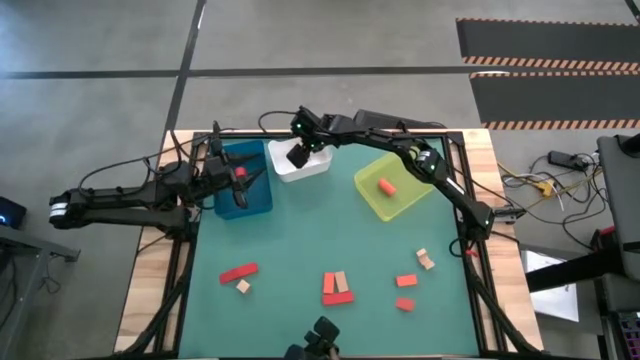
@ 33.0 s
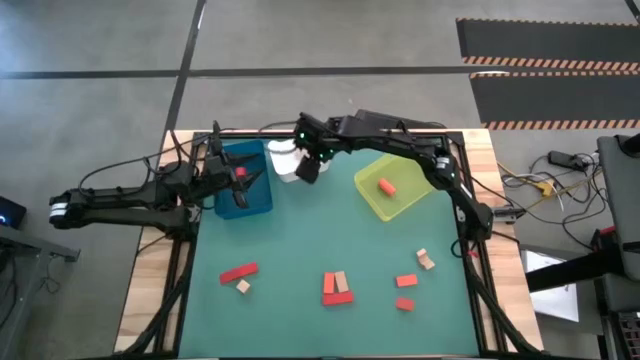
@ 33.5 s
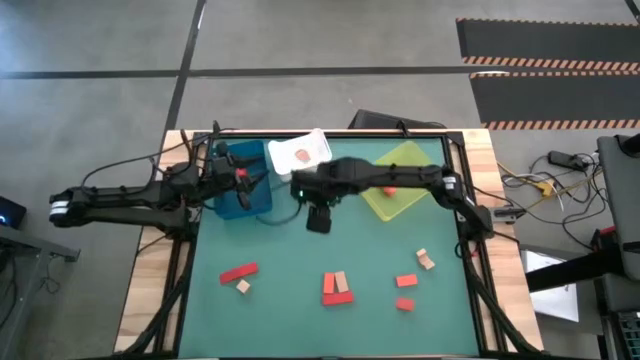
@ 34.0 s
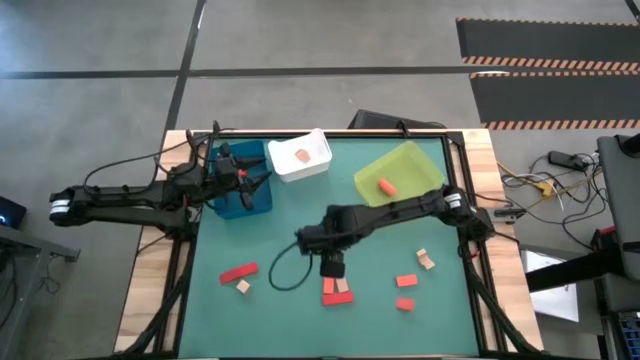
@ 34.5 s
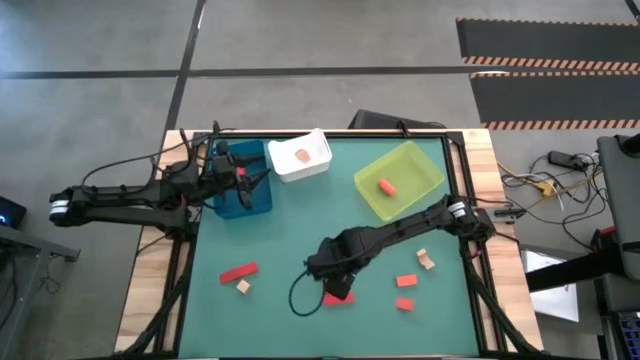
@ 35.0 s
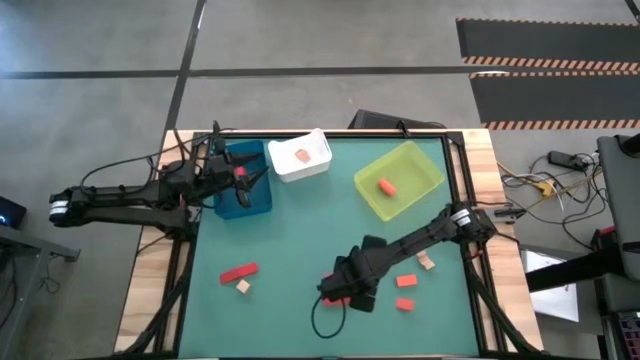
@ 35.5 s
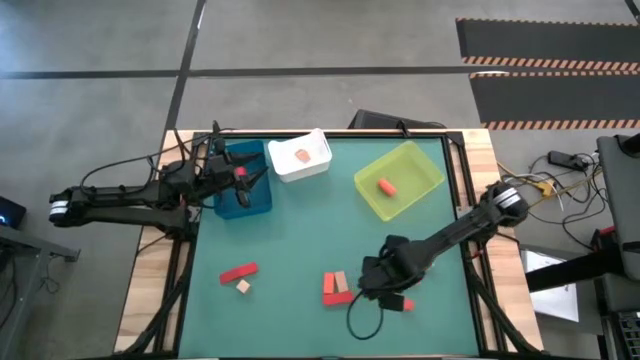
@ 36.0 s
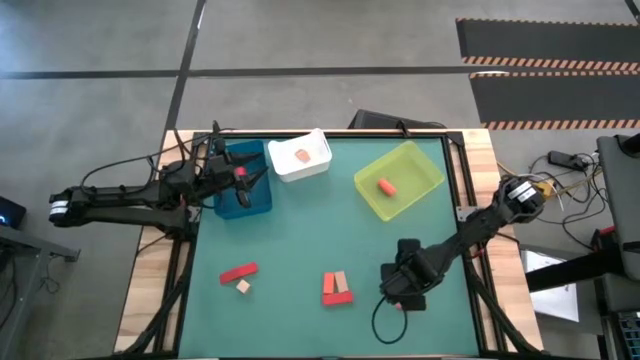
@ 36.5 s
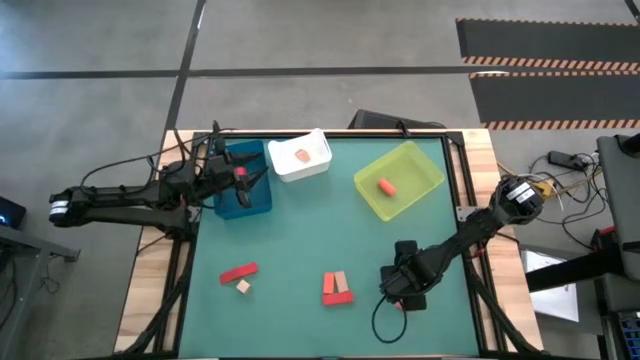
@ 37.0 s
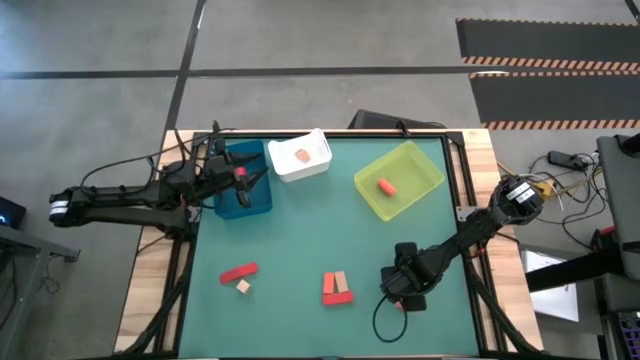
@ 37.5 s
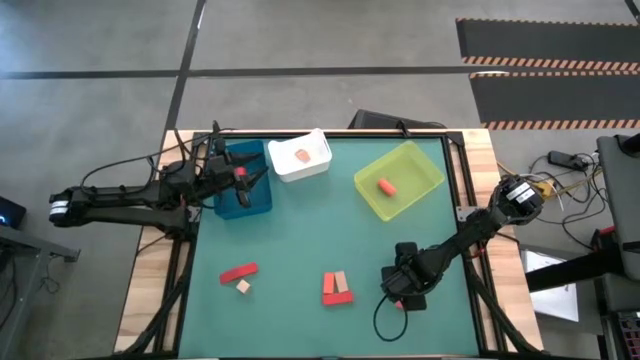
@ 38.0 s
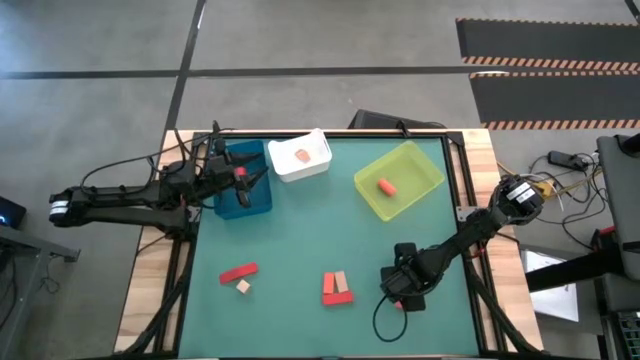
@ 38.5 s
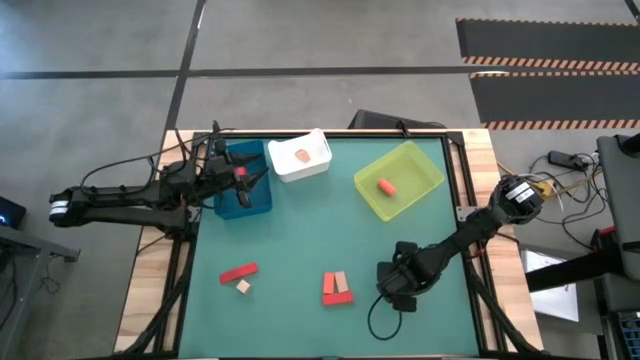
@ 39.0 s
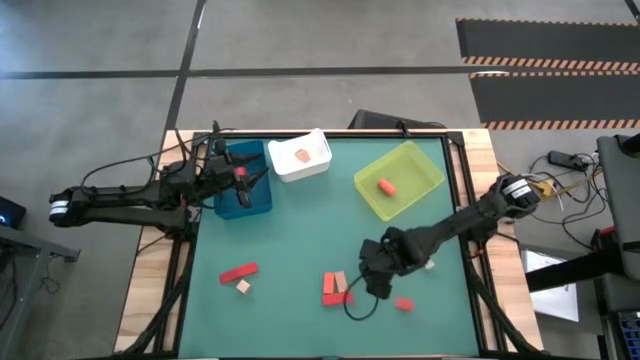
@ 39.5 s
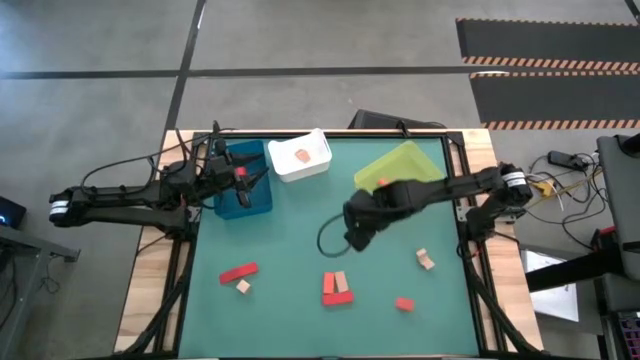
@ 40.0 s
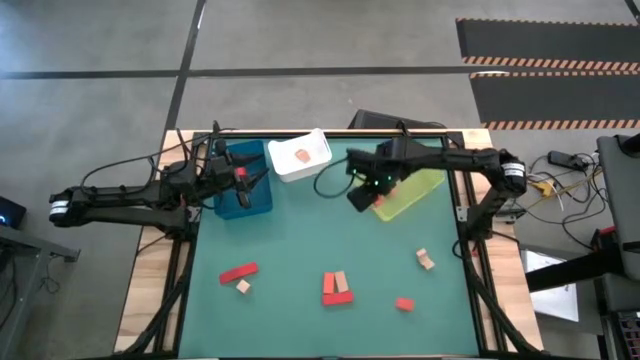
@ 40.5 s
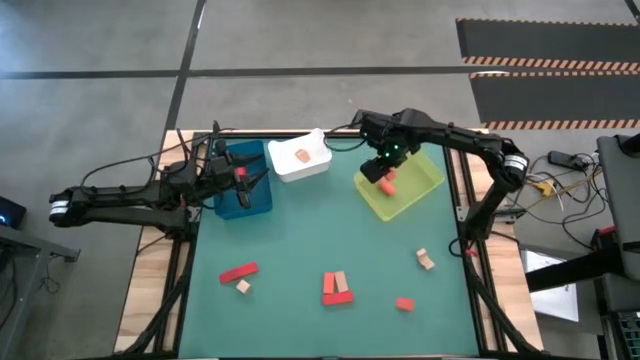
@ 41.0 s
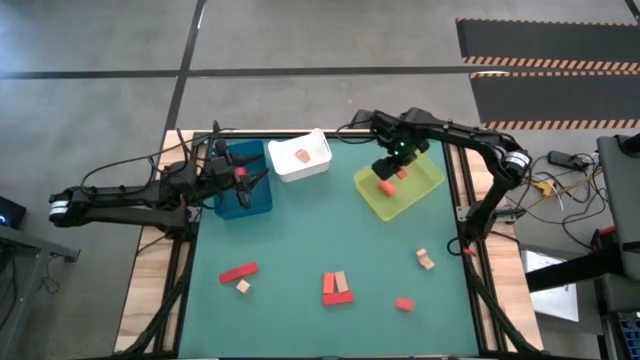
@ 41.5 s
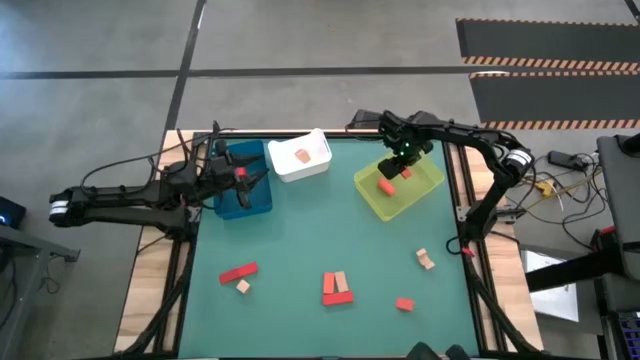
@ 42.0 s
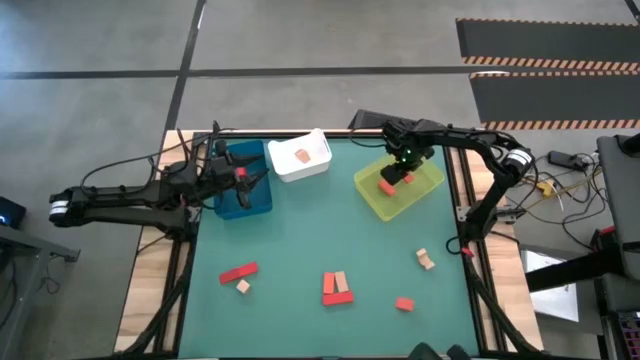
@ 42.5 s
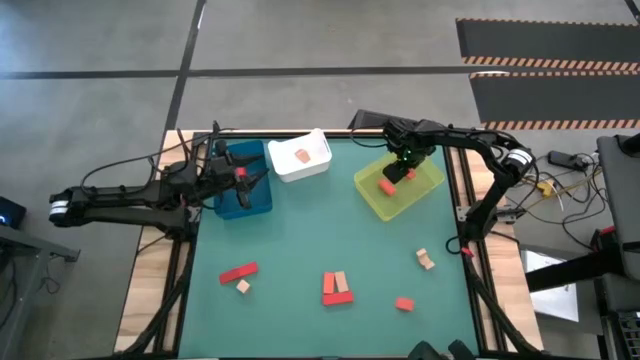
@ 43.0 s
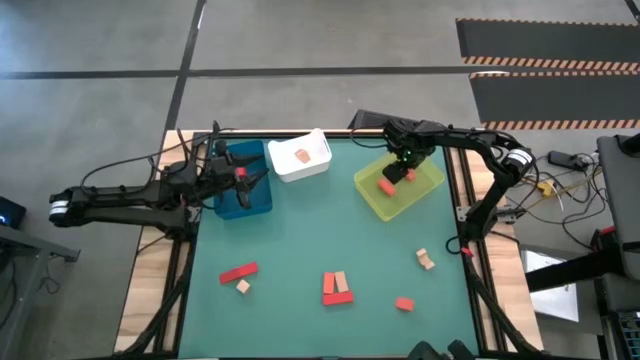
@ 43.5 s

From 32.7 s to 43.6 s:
Task: Sort & place blocks by color
Put the orange block into the yellow bin

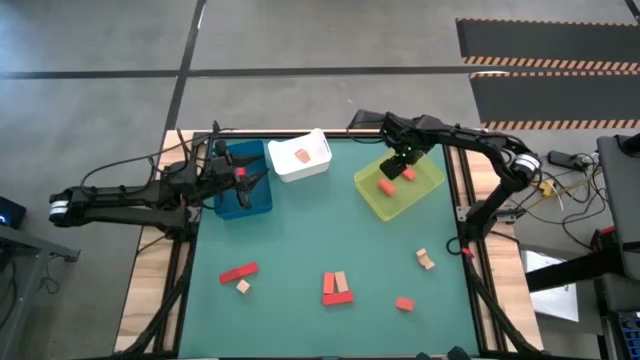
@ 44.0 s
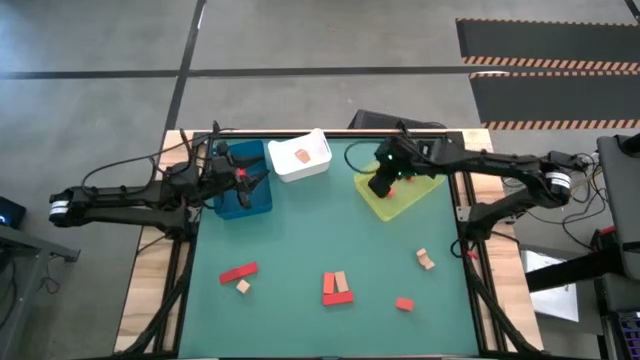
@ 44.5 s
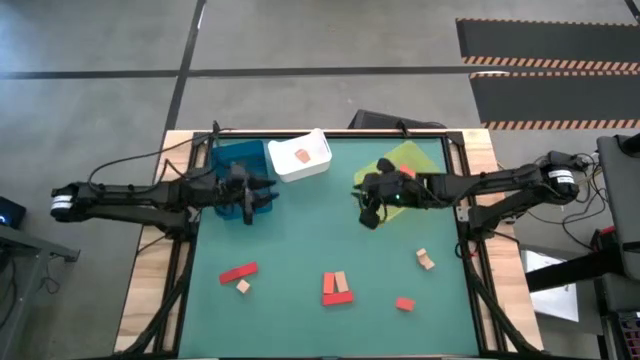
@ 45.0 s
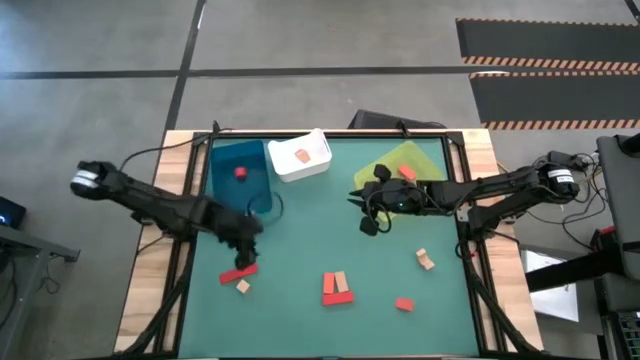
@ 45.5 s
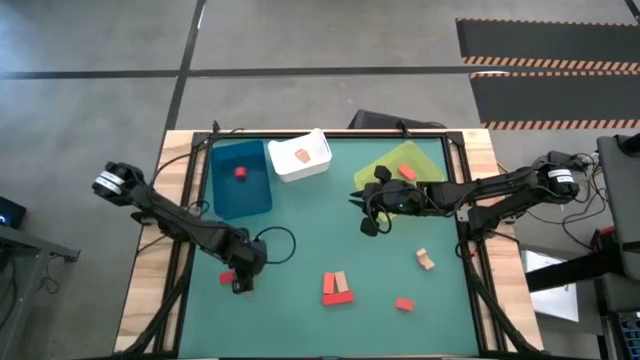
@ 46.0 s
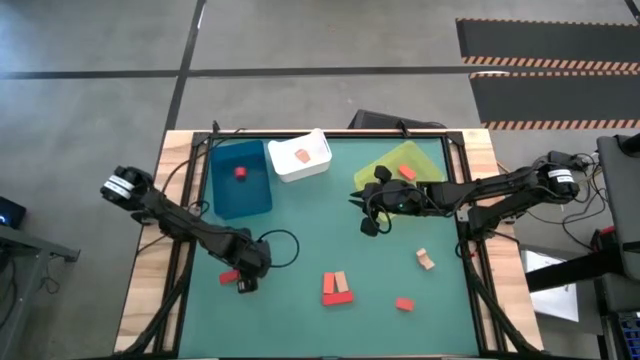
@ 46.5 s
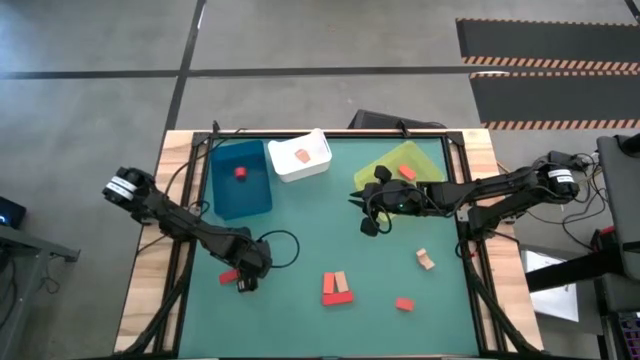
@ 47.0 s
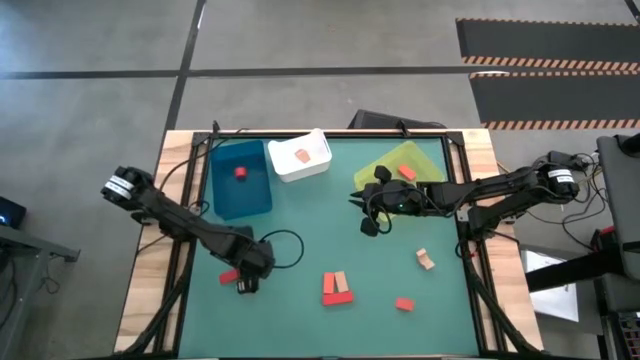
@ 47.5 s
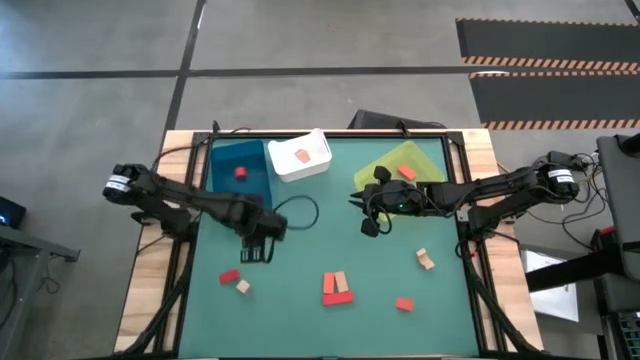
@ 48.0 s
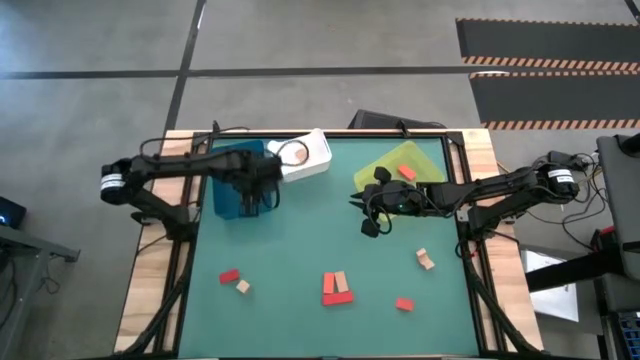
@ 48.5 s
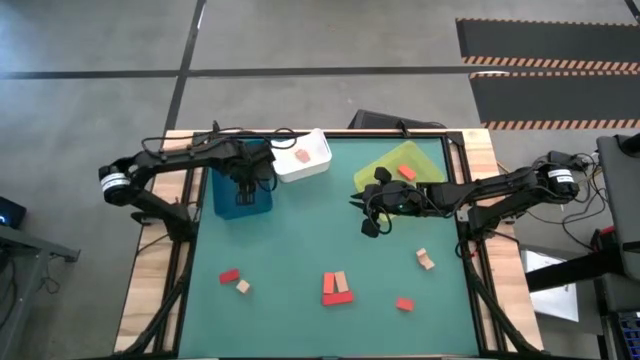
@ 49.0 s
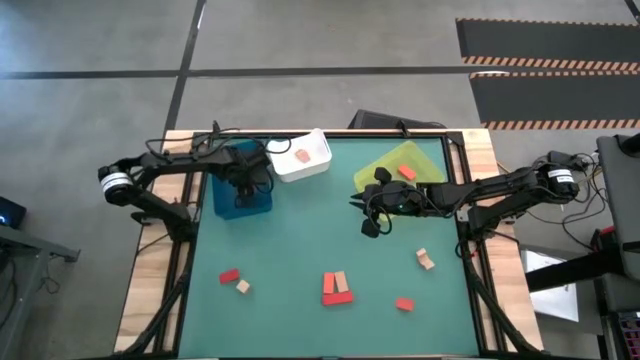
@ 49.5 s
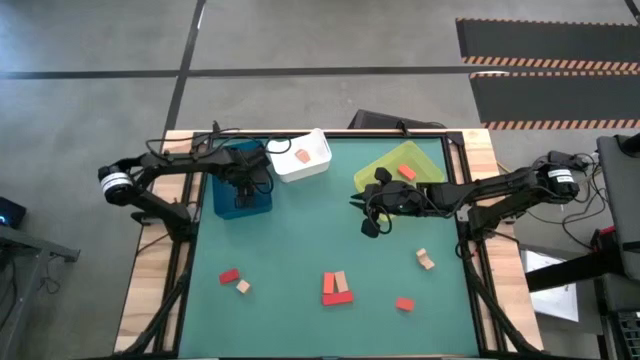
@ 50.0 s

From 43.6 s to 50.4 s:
Put the red block into the blue bin

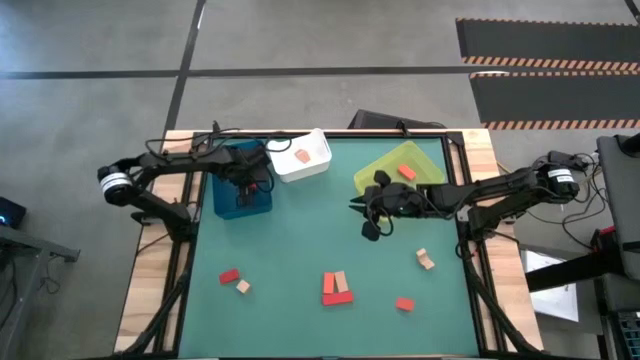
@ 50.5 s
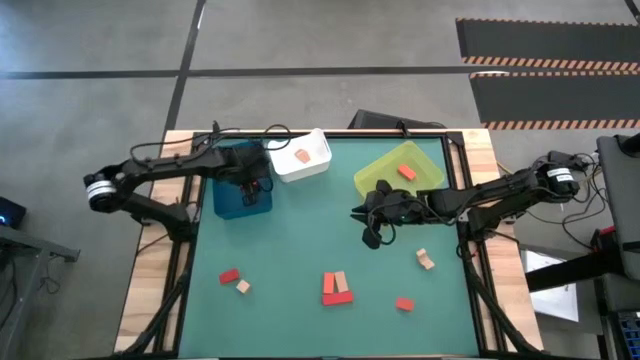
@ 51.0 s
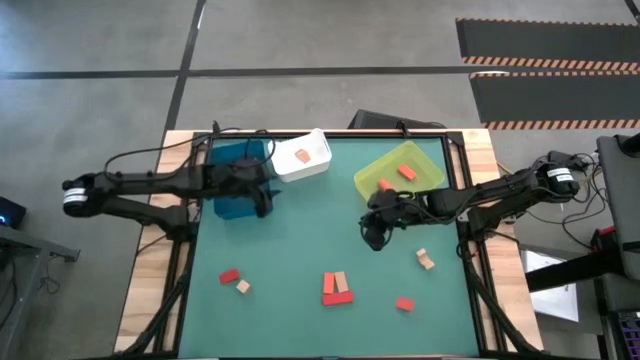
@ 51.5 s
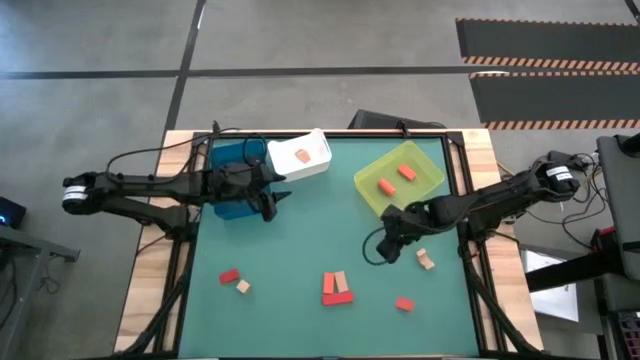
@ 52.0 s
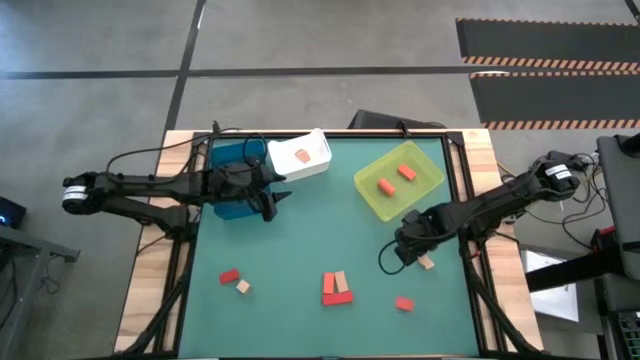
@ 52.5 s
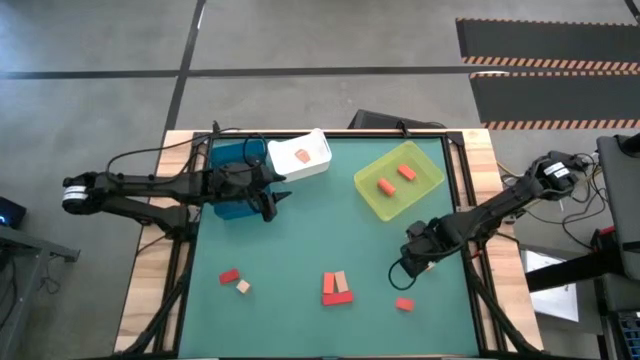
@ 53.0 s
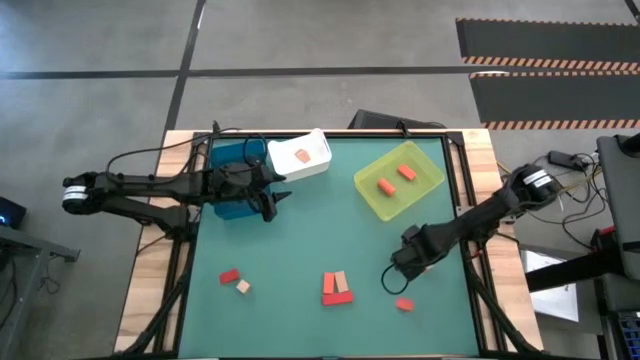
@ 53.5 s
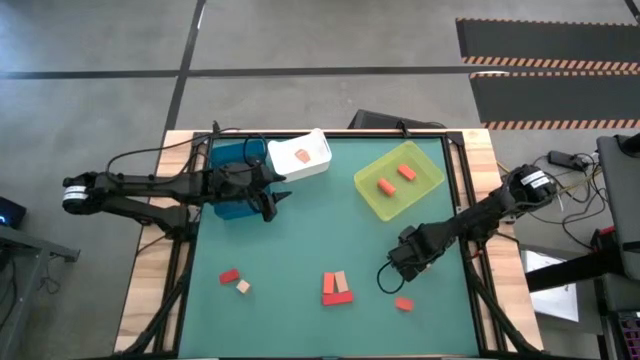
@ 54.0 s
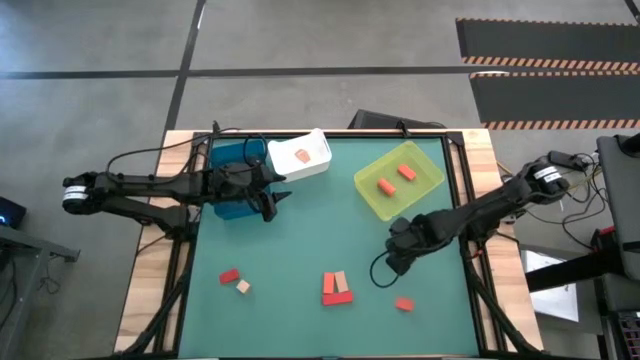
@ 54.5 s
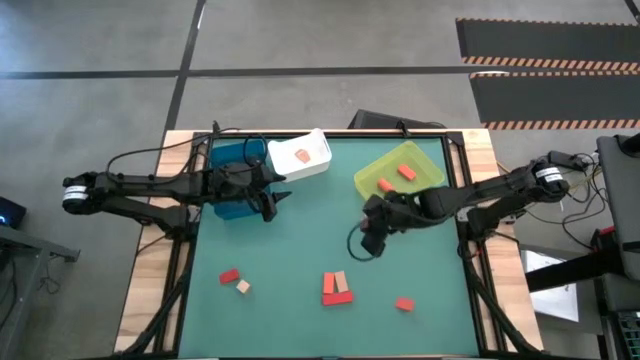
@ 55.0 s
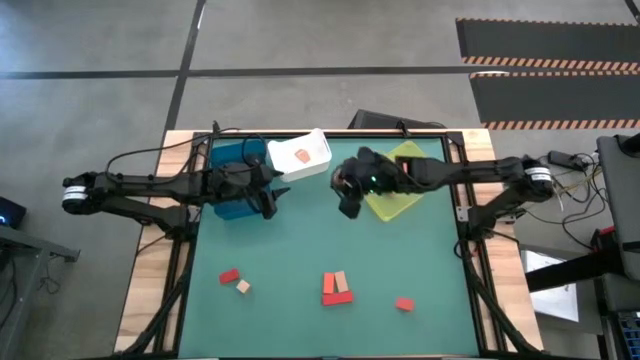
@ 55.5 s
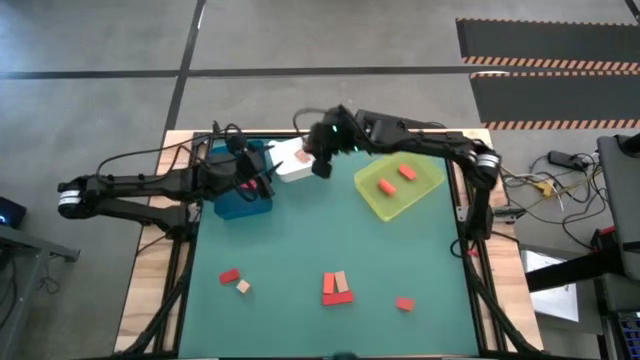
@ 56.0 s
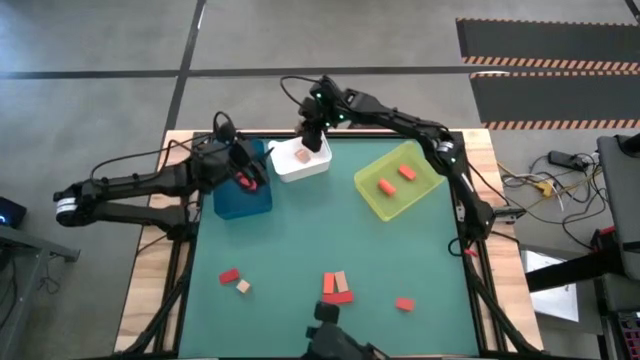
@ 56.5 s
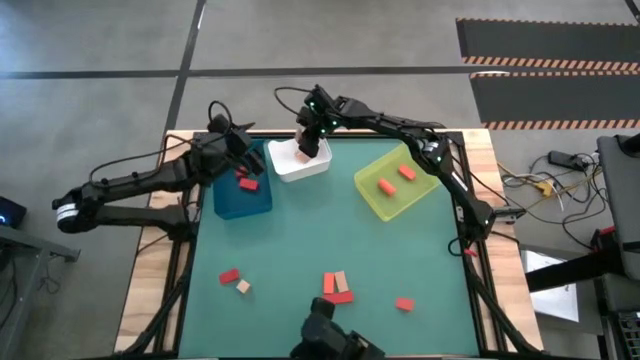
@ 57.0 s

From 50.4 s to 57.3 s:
Put the brown block into the white bin
